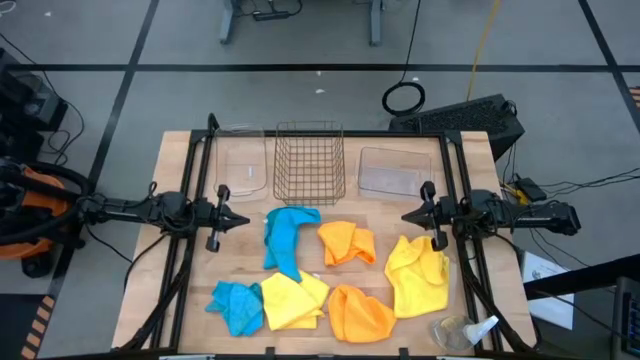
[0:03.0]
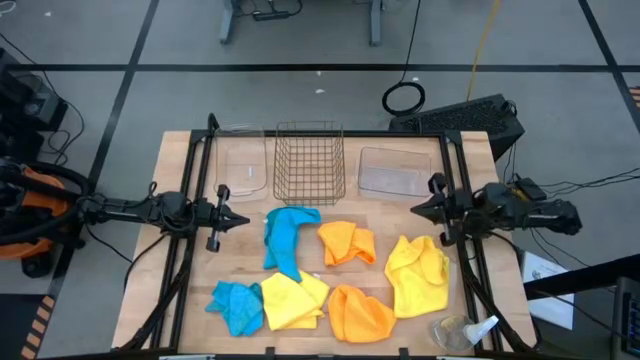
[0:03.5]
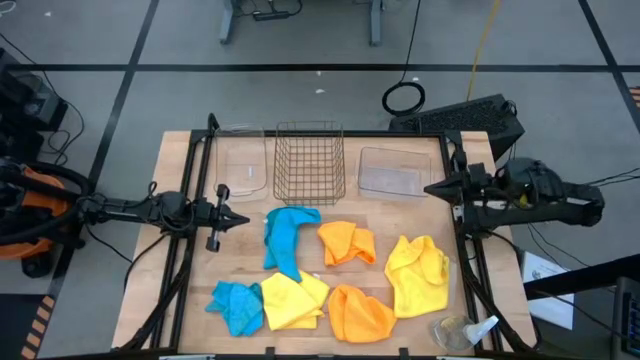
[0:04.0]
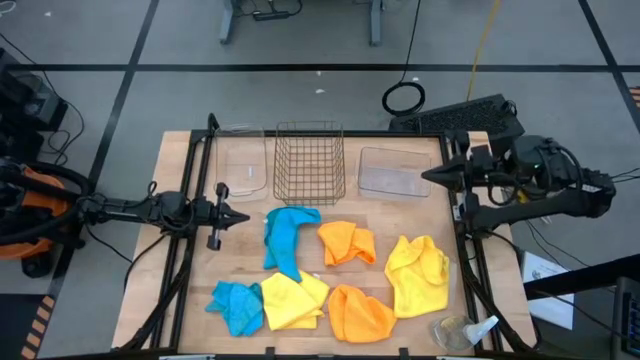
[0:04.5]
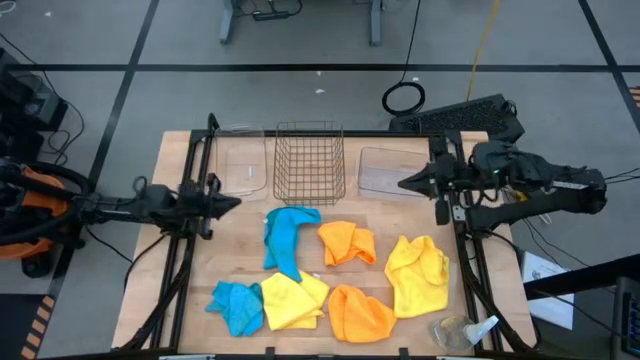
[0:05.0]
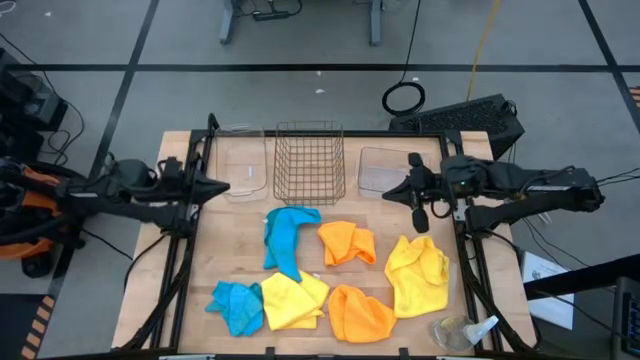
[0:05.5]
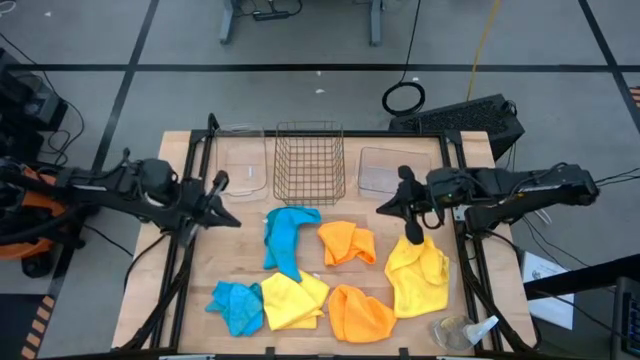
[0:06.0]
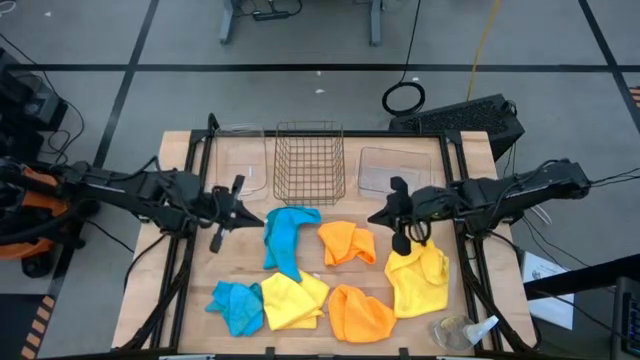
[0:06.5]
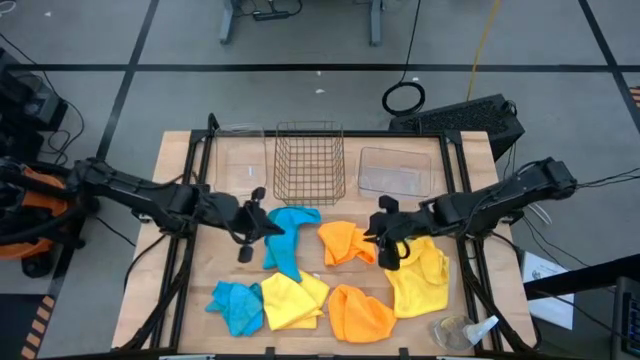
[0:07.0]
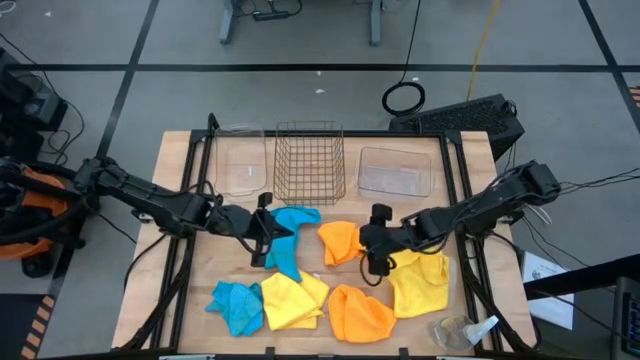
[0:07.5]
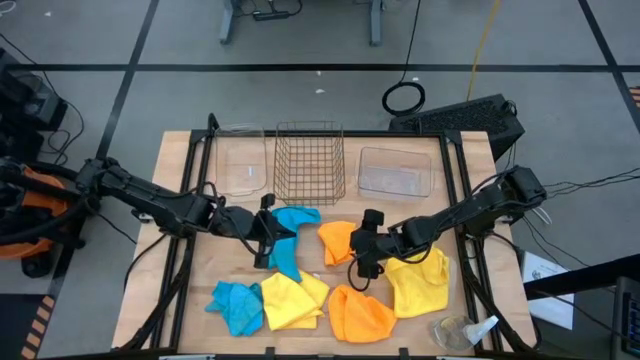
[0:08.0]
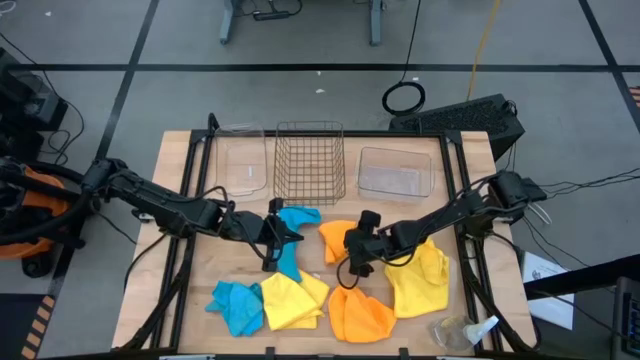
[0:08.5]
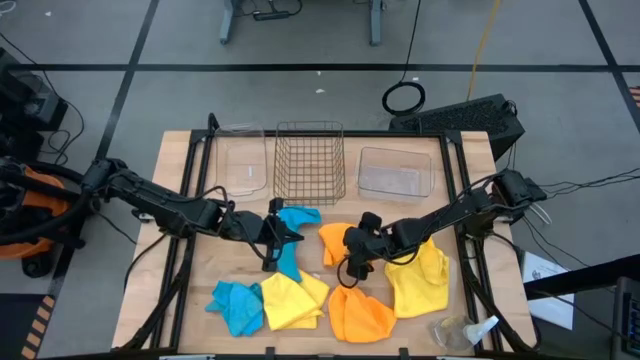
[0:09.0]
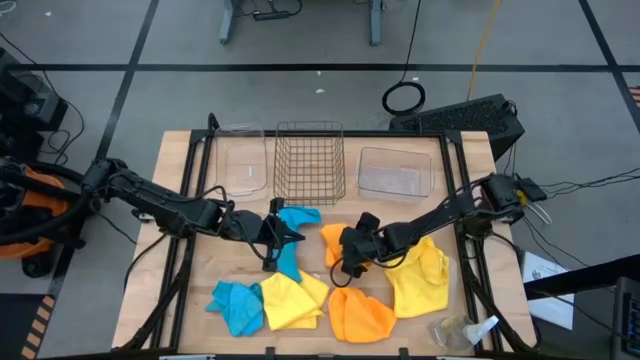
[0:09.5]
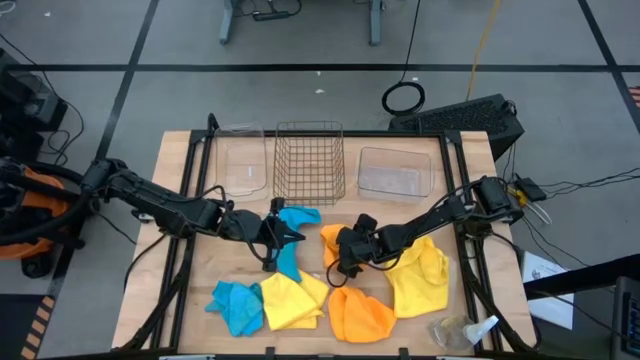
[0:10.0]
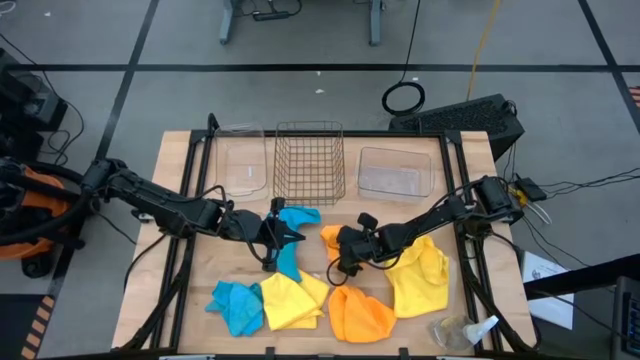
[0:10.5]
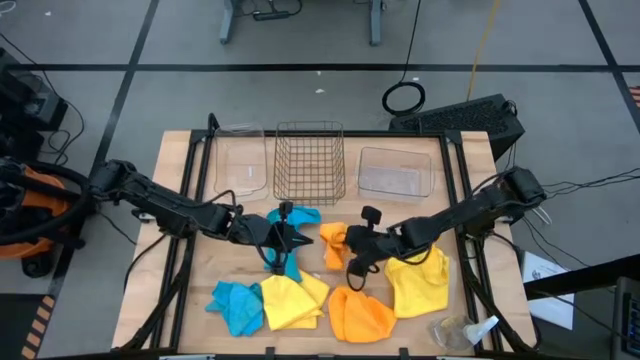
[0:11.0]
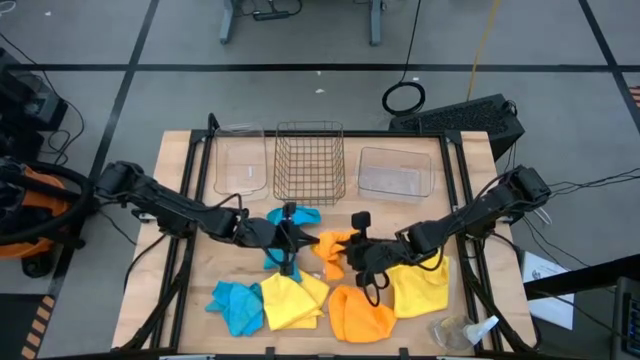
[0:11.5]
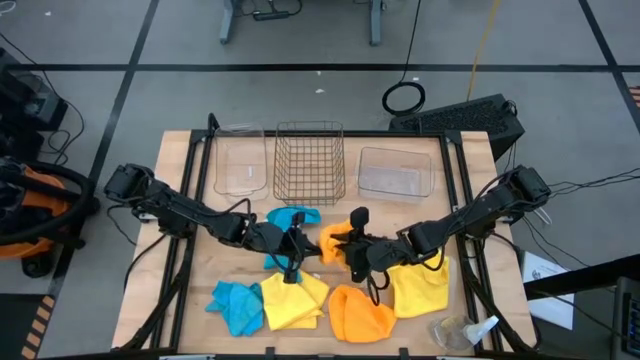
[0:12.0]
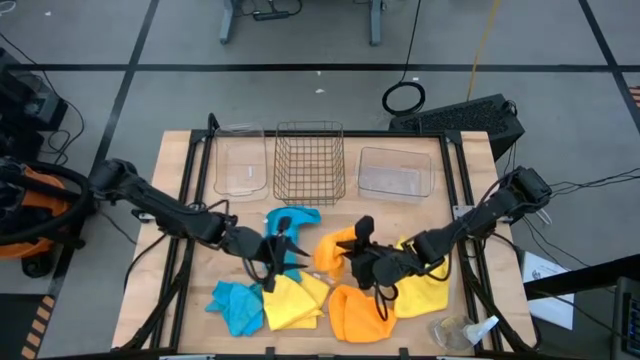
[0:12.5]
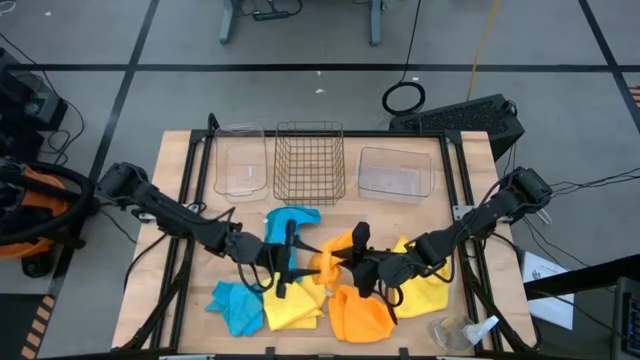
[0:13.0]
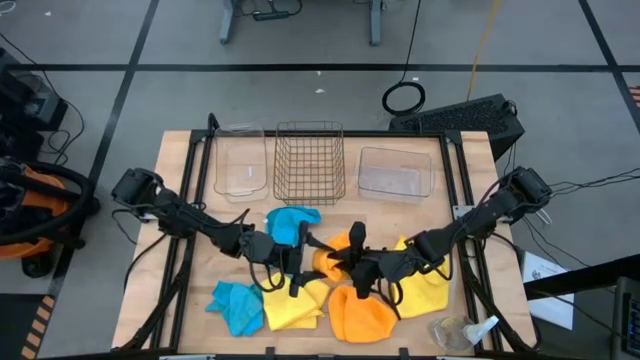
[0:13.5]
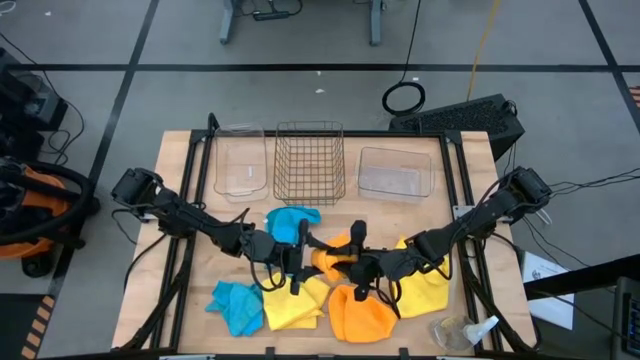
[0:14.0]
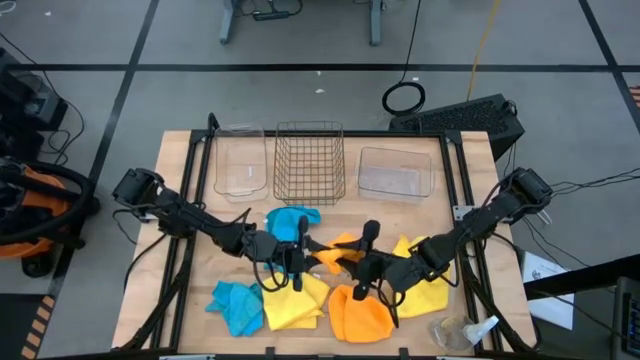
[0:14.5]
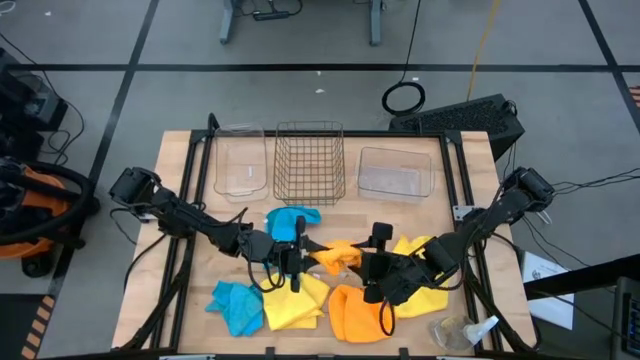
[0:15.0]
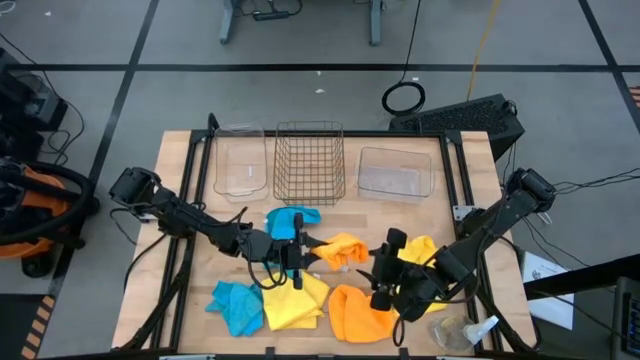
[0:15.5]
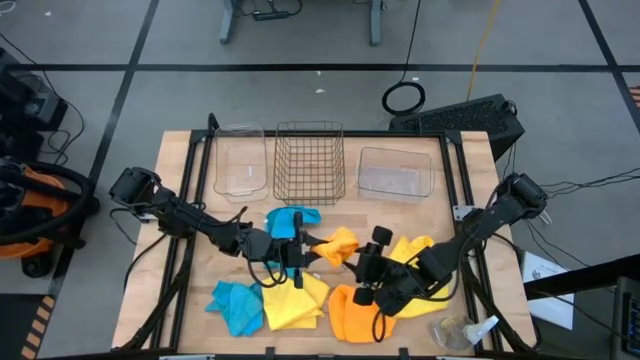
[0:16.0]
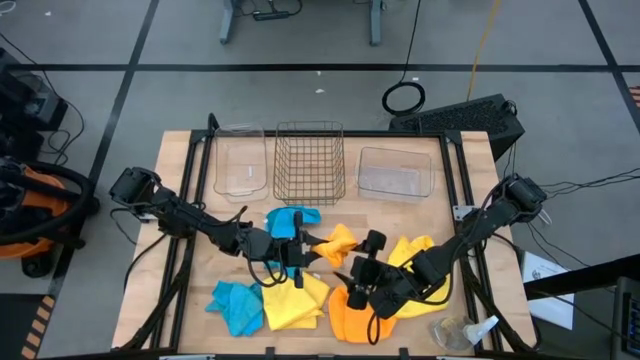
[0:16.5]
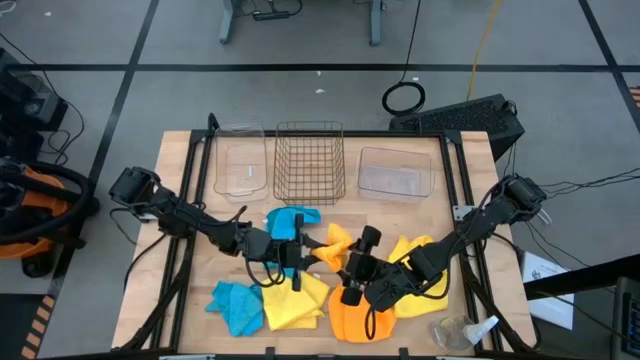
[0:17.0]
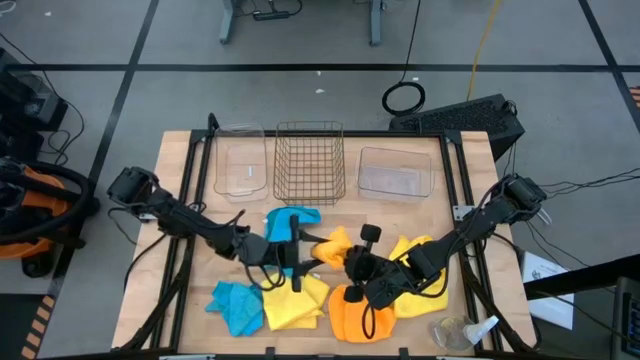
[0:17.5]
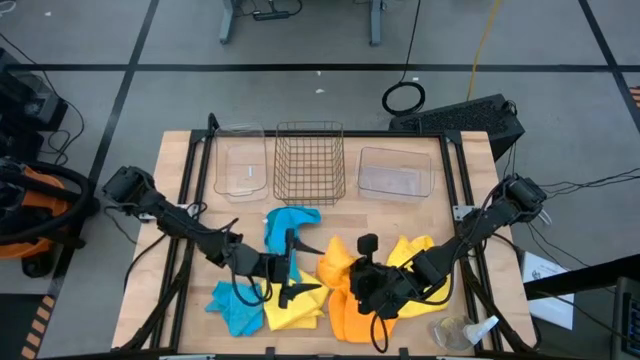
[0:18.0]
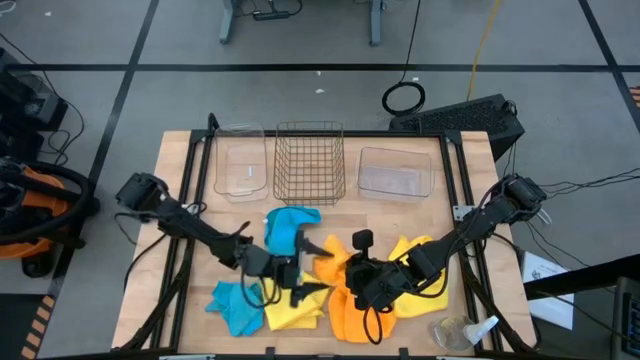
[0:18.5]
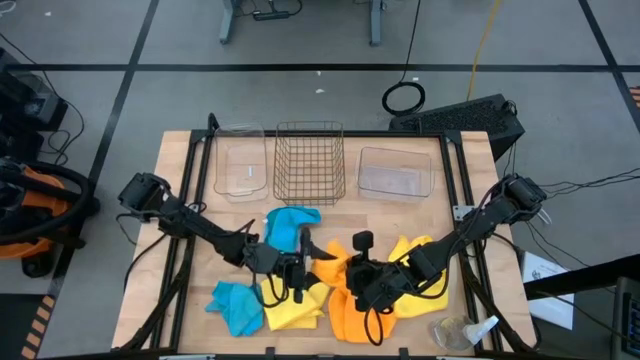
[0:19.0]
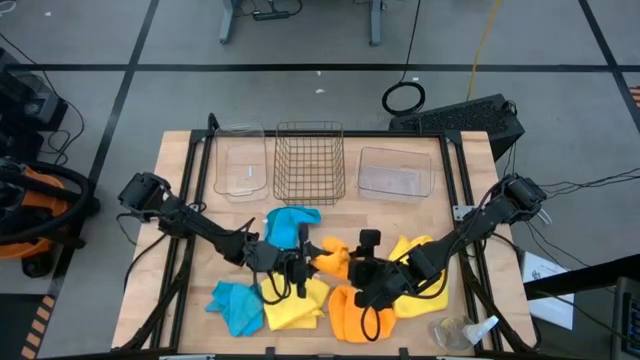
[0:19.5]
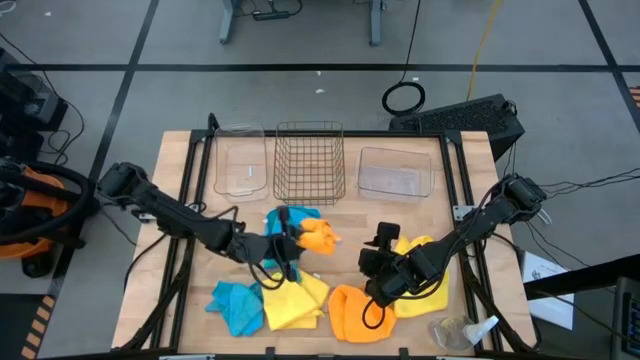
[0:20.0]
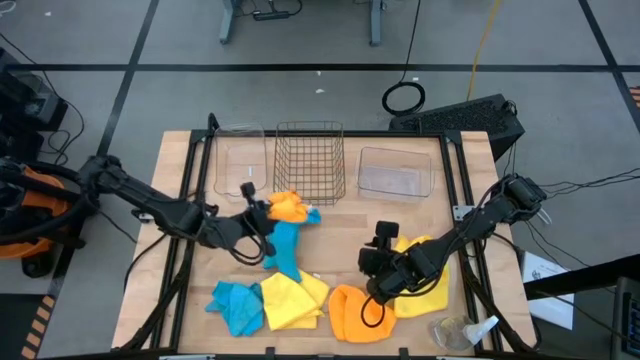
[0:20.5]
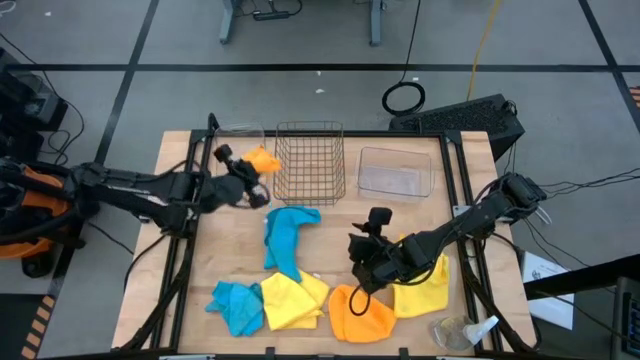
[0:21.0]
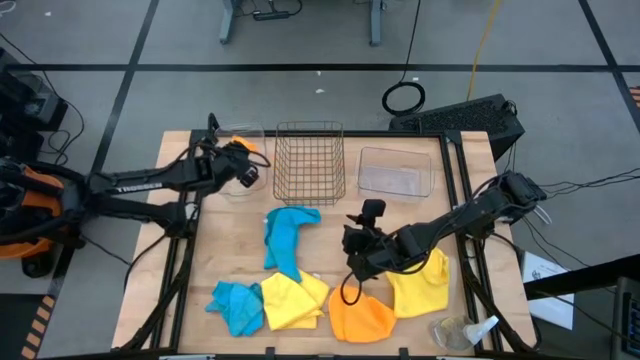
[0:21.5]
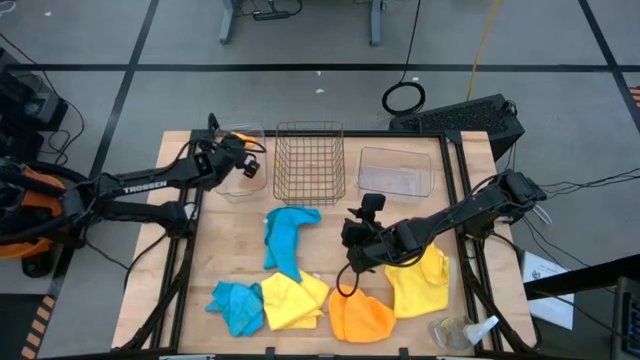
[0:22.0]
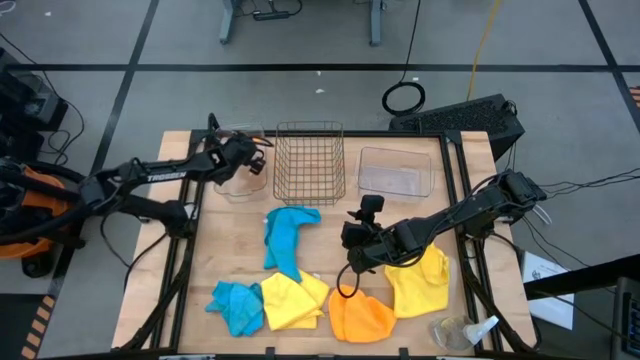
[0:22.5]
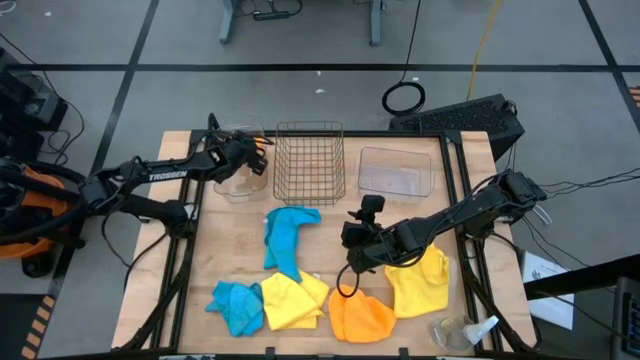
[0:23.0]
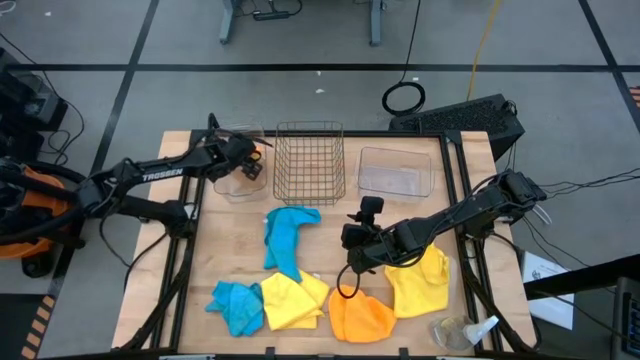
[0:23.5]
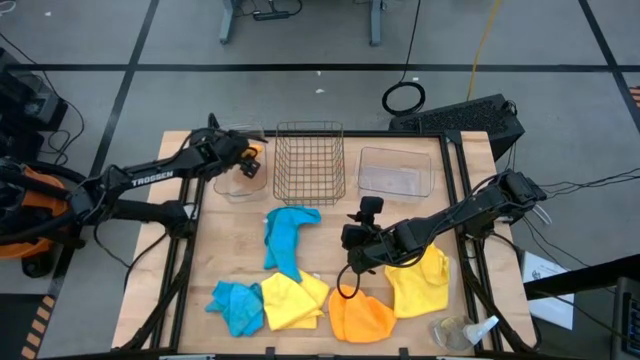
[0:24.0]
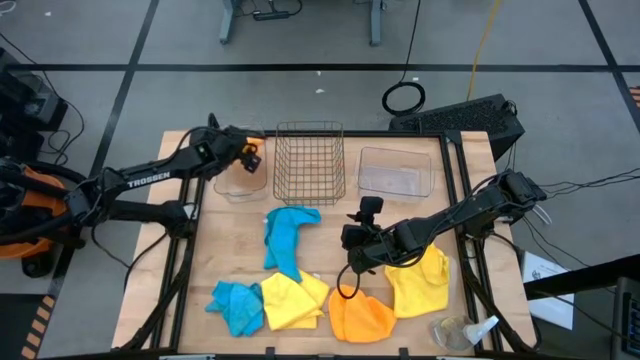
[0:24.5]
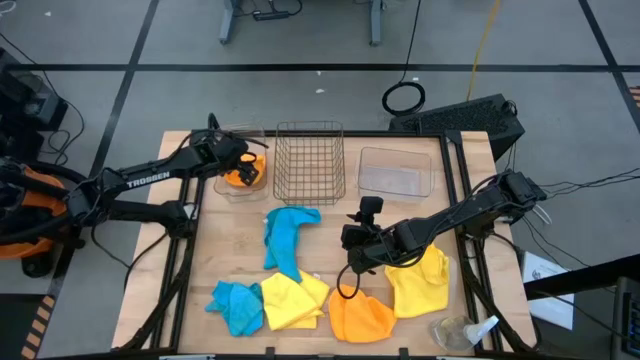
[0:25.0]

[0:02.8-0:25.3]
Task: Sort microfiber towel by color & place in baskets
Put the top orange microfiber cloth into the left transparent bin
